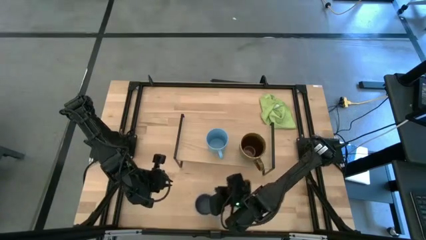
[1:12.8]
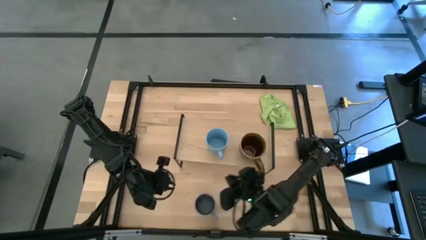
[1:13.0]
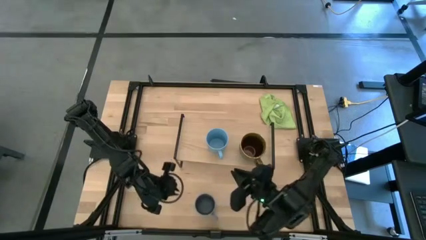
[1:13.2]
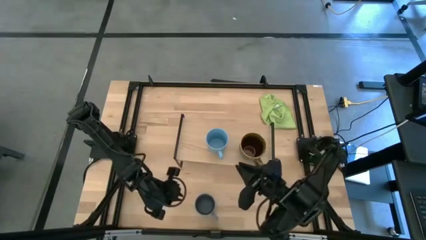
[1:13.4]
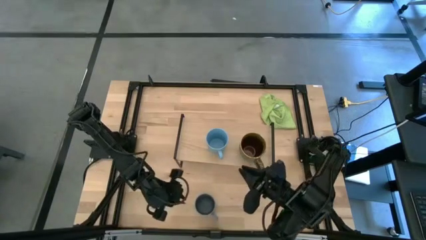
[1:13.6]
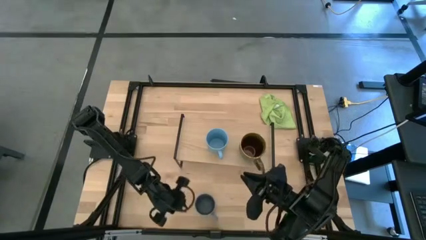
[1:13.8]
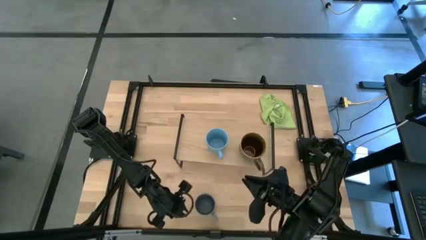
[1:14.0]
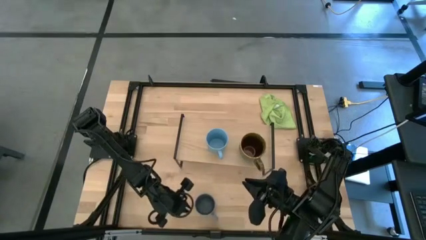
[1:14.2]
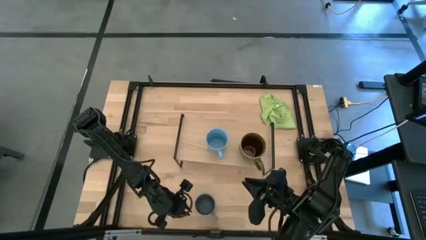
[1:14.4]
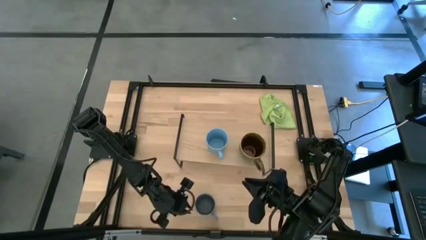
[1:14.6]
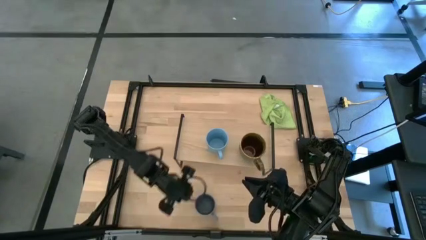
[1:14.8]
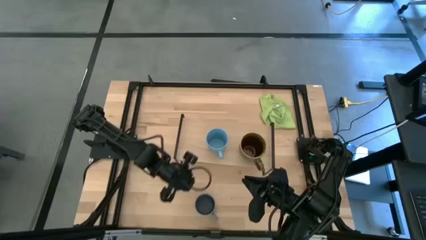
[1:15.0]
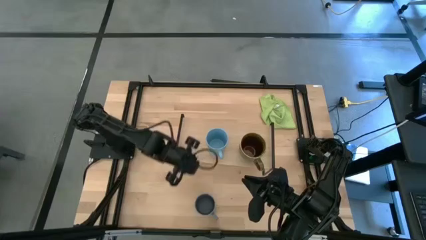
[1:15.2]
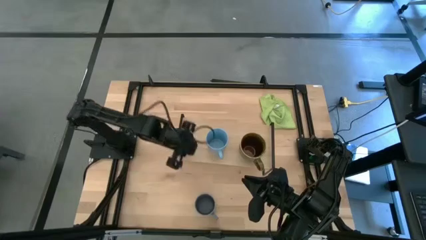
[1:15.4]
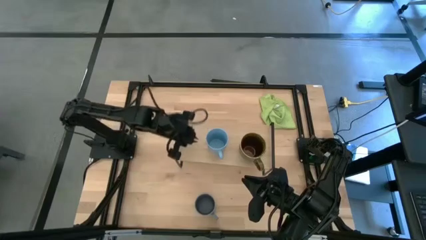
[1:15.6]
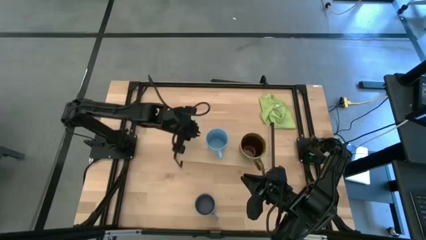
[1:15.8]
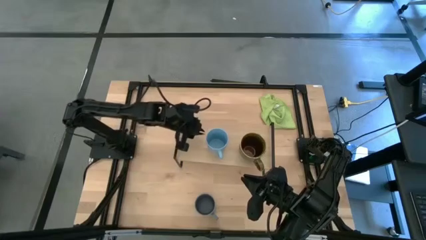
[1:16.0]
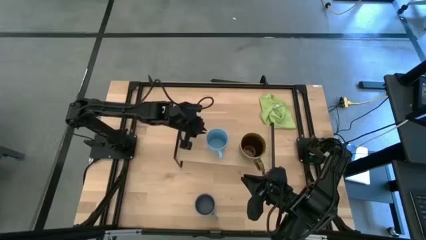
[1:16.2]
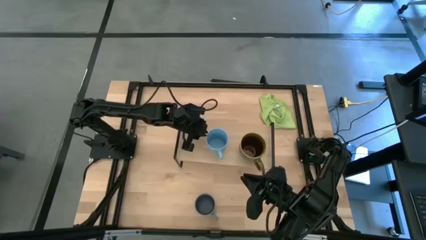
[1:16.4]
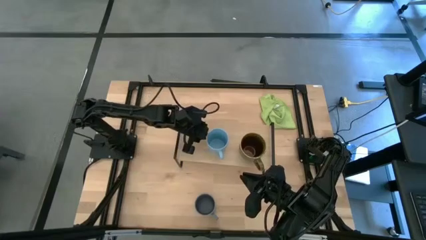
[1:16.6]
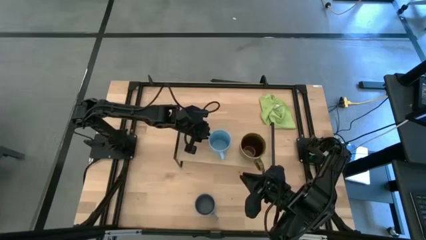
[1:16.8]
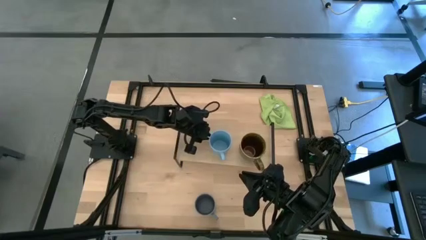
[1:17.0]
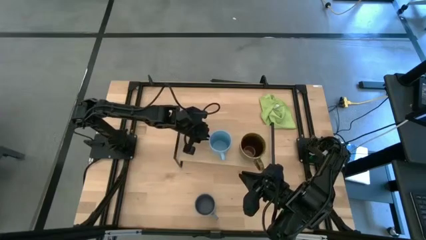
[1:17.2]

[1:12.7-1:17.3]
Task: Stack small to large cups/mugs on shelf
Adjust the light blue mug on the shelf

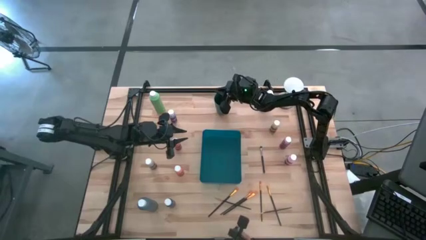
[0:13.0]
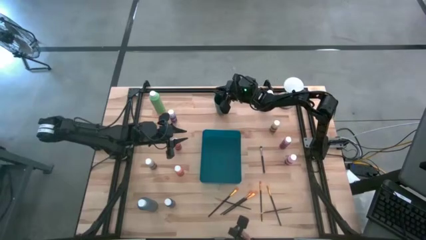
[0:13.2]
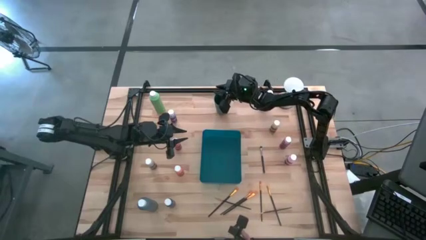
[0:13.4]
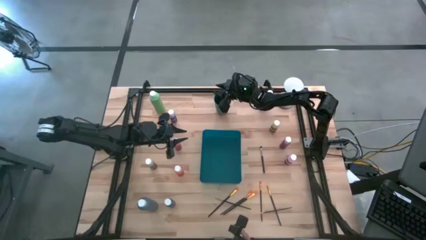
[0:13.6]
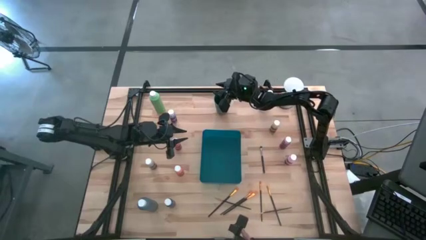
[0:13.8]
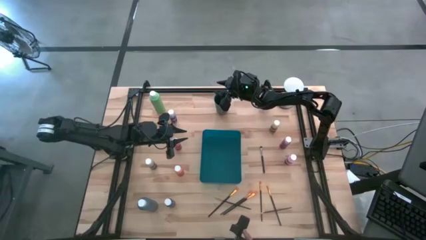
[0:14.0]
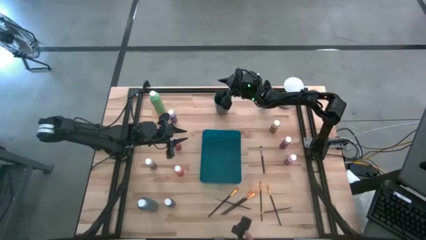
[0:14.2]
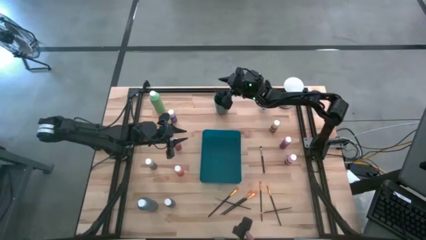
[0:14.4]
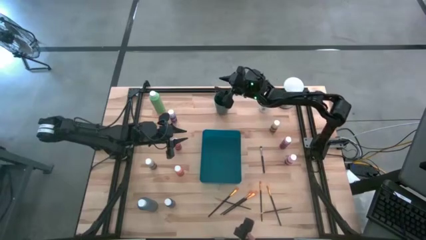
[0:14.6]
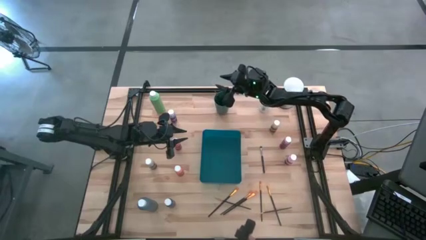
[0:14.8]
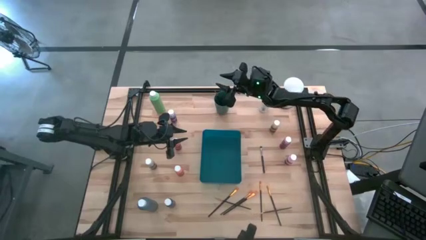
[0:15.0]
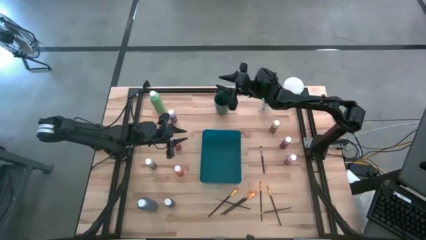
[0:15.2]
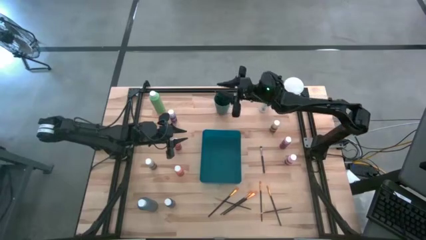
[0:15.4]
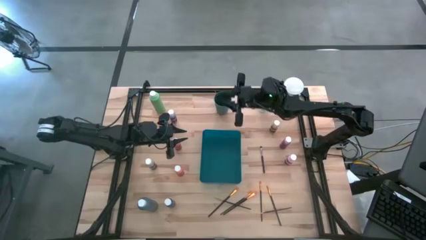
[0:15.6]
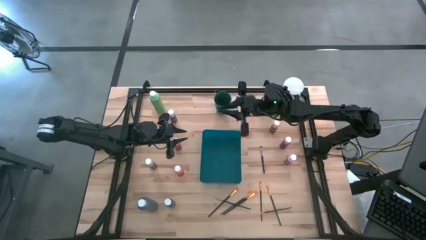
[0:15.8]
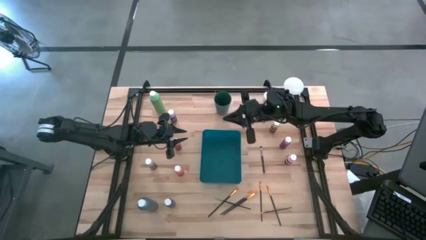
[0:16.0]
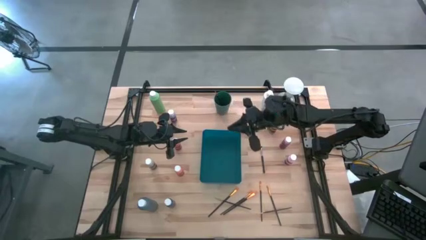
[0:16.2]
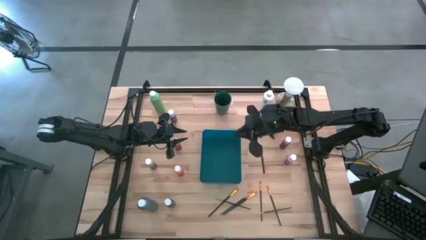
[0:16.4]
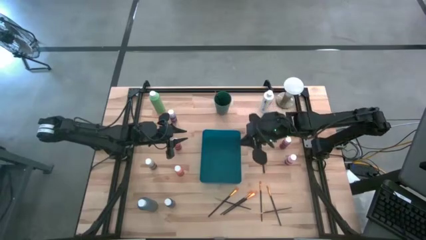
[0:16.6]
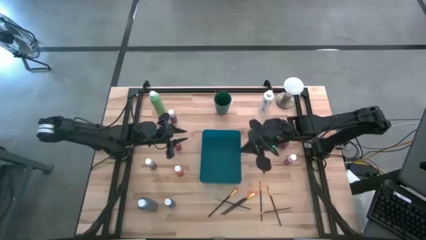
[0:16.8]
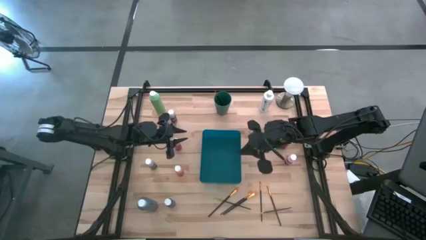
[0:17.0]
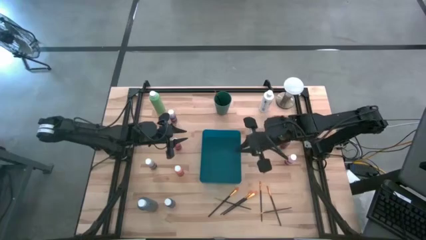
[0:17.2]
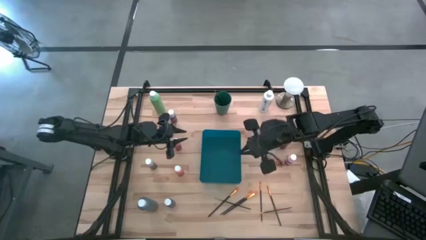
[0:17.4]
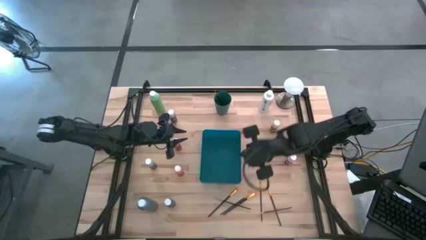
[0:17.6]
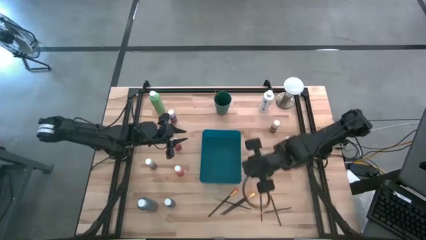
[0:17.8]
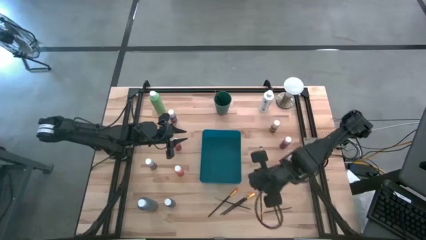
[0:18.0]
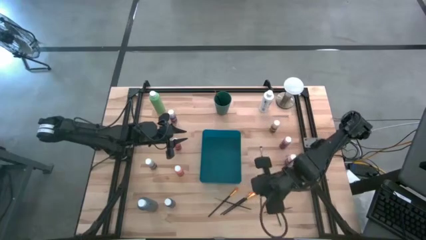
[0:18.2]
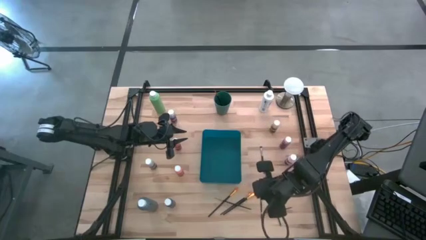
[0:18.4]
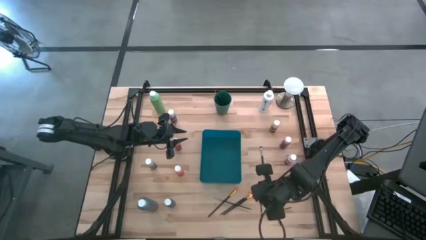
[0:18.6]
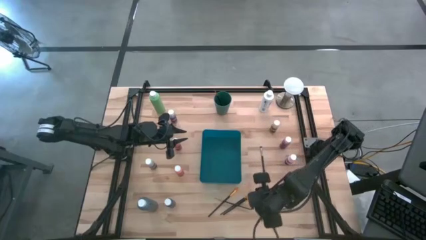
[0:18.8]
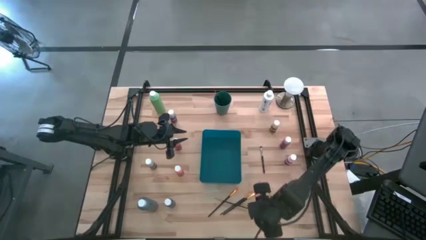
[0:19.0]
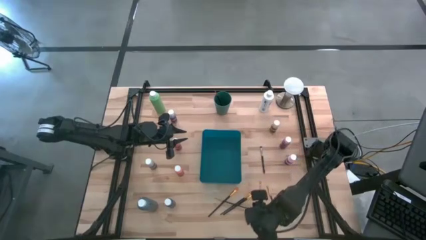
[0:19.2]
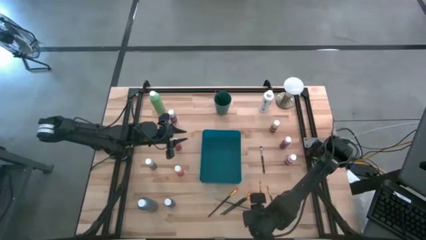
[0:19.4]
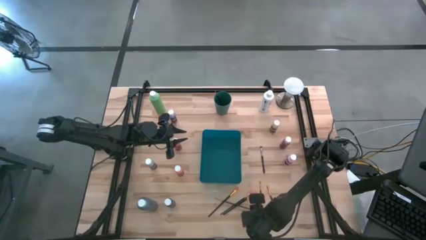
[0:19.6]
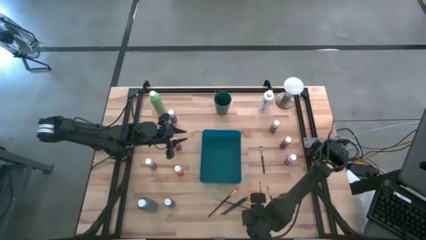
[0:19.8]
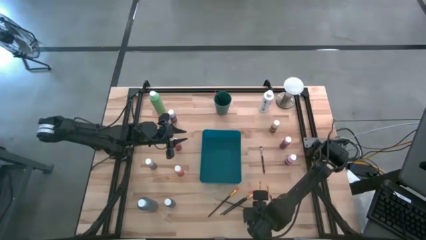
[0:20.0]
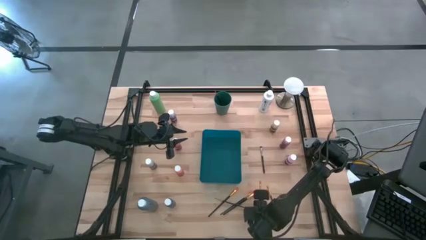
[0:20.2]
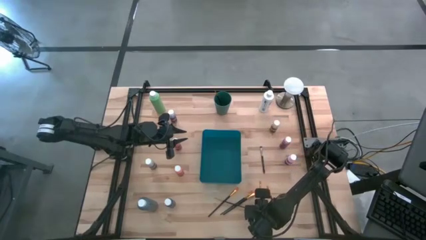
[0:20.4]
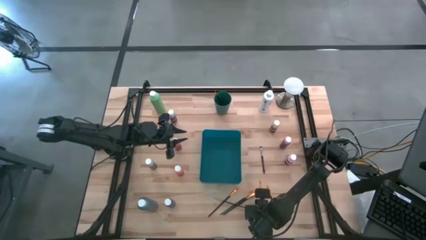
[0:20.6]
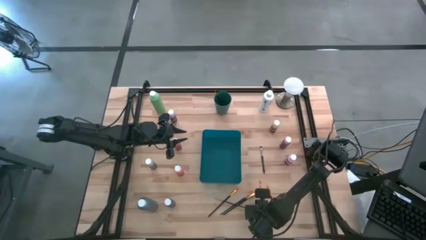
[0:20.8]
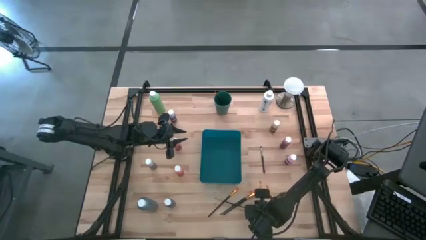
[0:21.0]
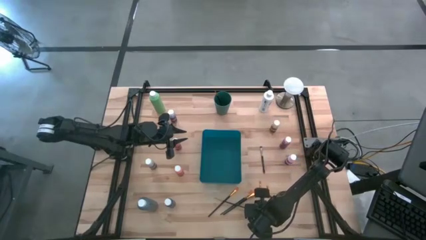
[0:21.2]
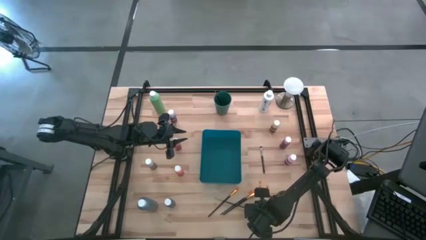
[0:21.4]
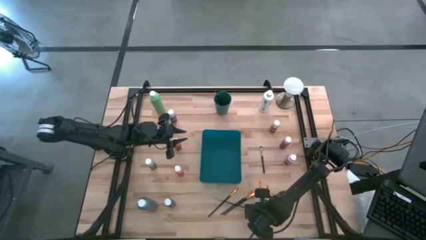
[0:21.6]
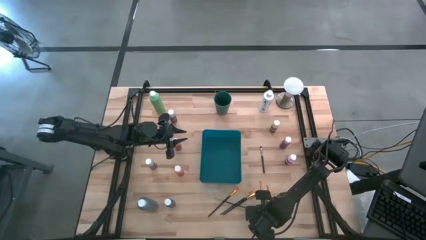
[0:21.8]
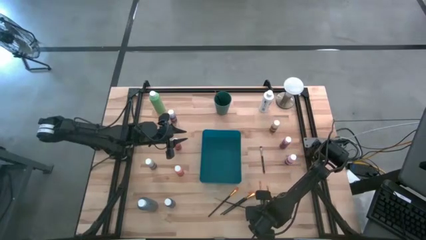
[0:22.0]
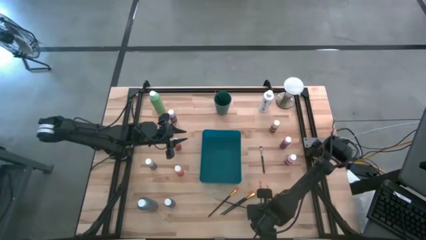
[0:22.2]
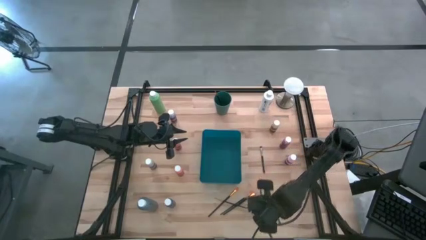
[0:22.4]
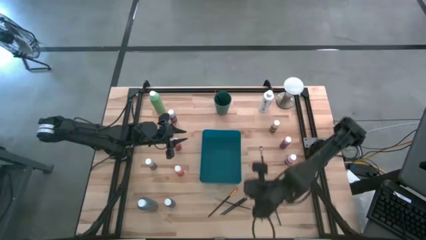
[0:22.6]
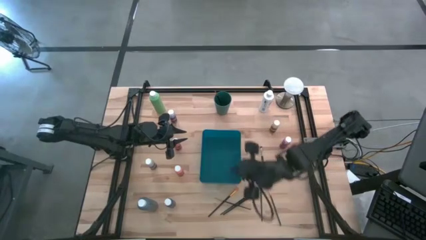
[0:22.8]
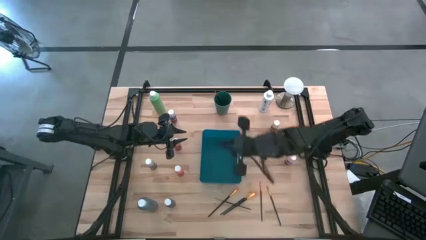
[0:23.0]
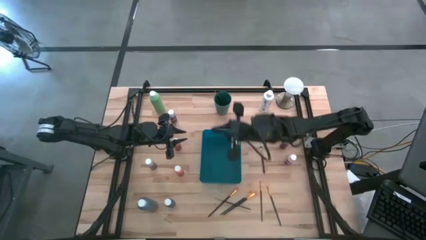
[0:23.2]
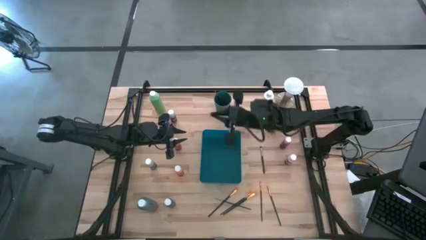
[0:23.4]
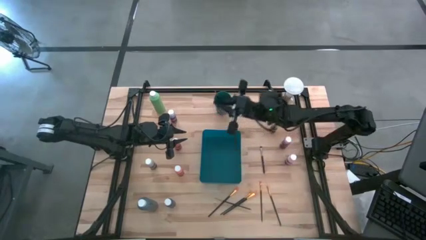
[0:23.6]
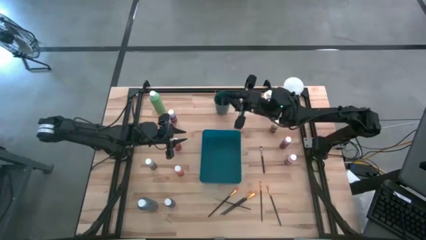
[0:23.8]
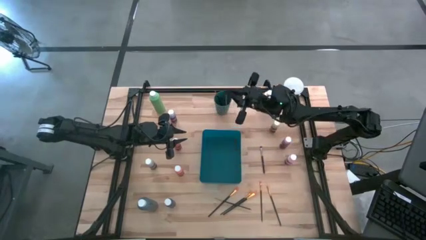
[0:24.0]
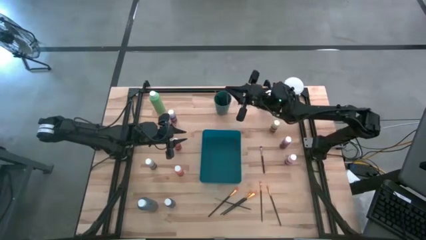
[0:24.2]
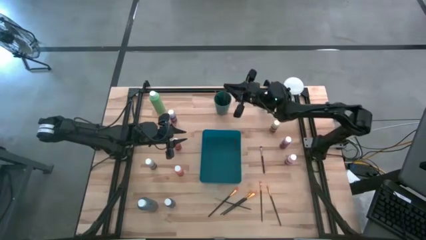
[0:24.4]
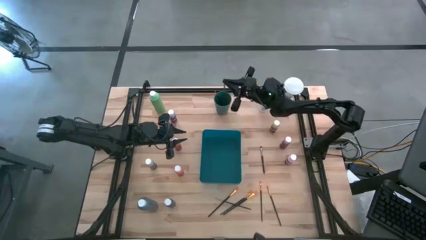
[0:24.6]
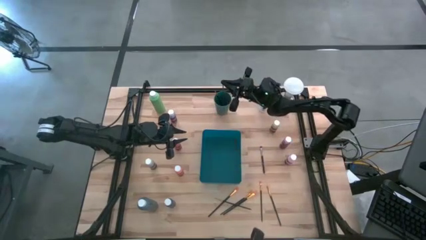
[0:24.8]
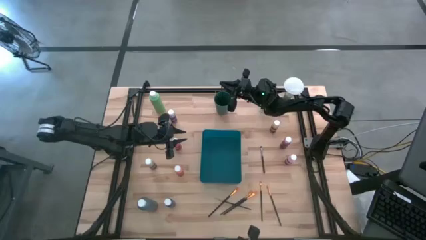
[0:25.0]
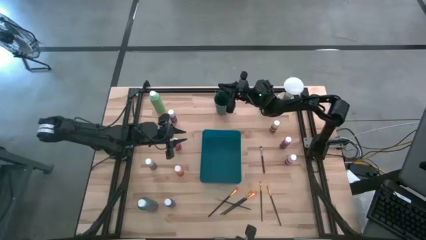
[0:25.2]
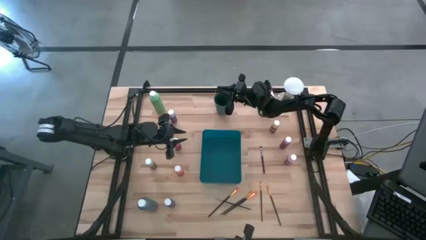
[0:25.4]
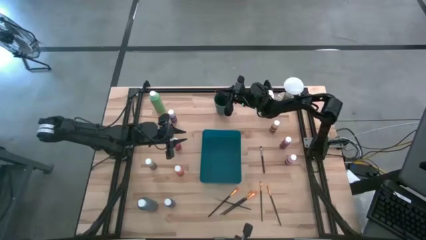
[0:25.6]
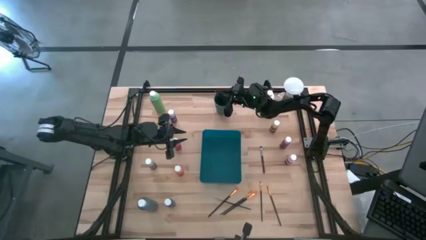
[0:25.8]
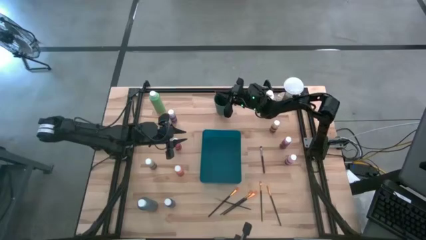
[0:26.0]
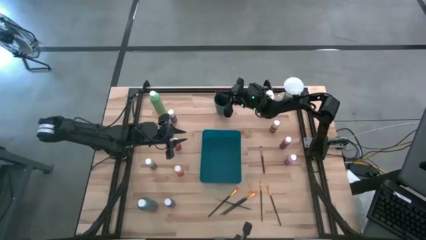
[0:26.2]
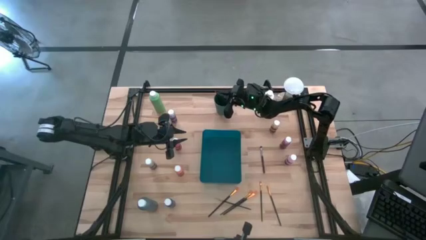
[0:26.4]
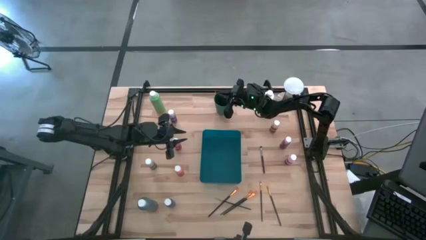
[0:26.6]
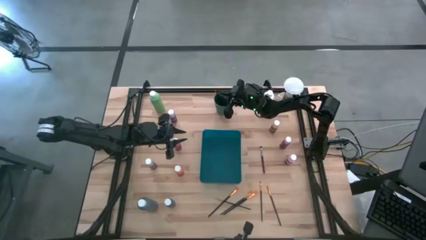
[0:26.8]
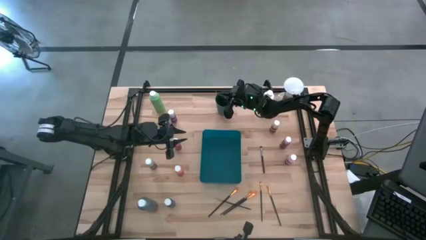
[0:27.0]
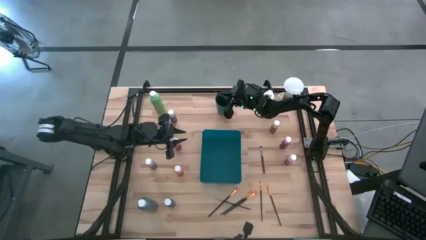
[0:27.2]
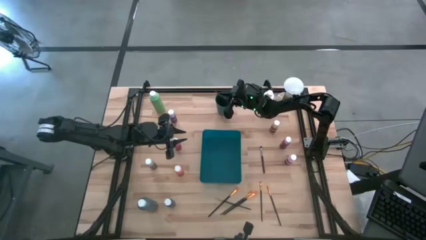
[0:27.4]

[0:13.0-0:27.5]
Task: Pick & Place Paint Supplies
Put the gold paint brush into the green cup
